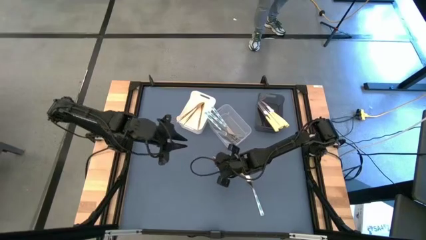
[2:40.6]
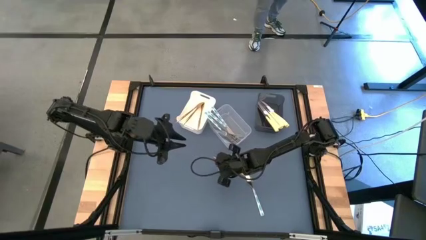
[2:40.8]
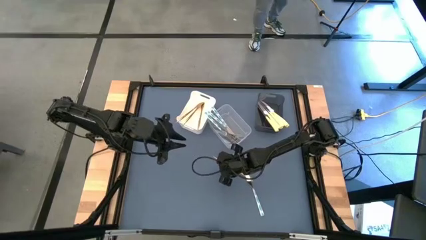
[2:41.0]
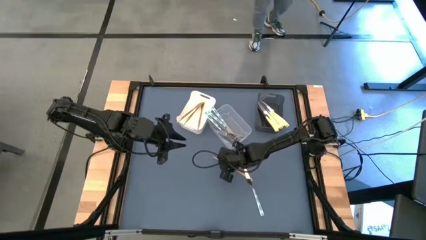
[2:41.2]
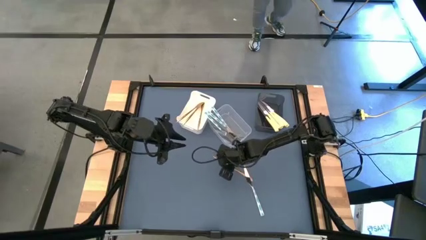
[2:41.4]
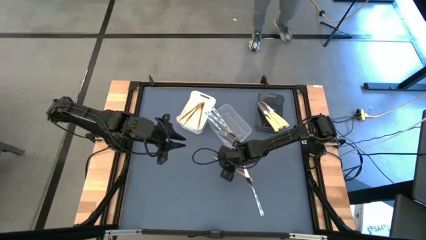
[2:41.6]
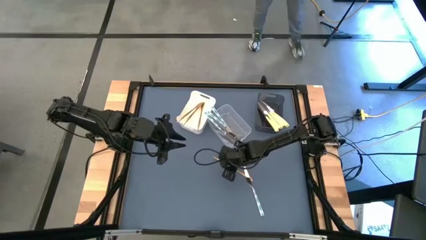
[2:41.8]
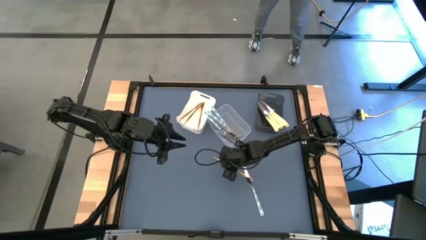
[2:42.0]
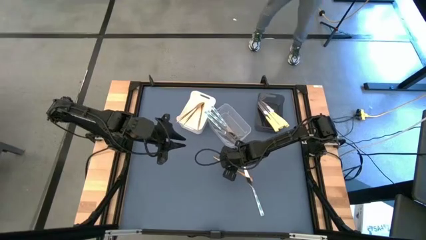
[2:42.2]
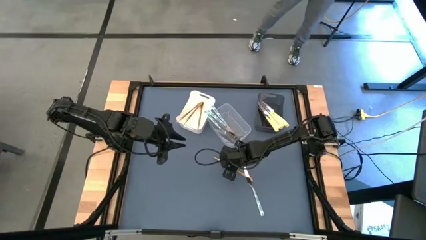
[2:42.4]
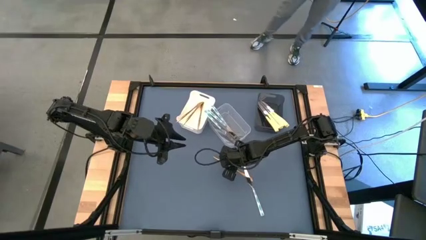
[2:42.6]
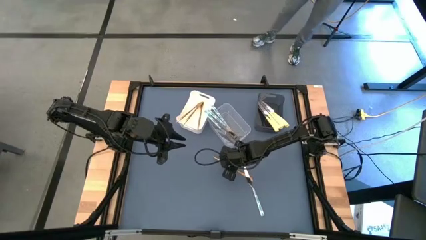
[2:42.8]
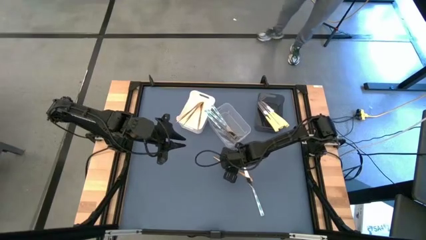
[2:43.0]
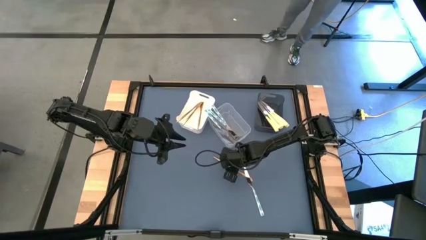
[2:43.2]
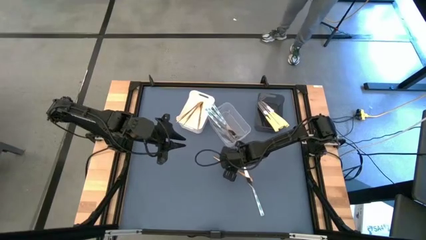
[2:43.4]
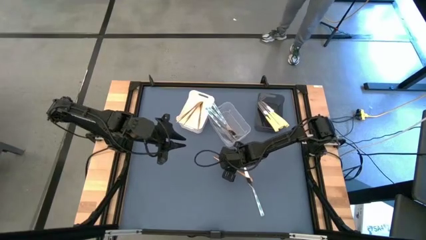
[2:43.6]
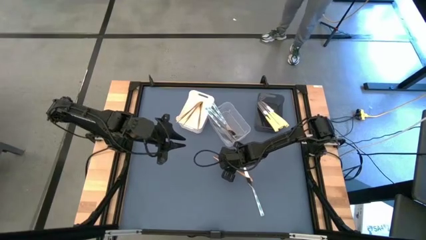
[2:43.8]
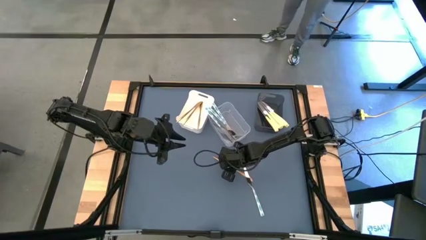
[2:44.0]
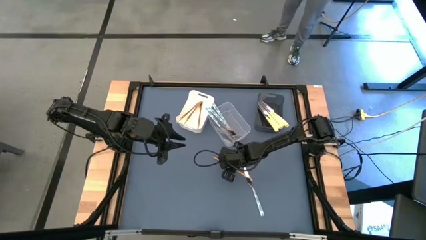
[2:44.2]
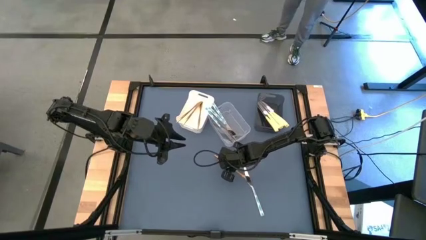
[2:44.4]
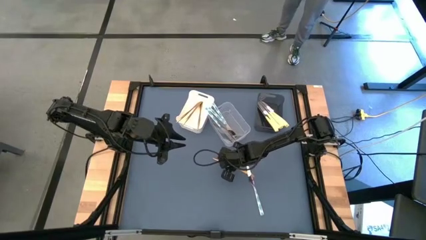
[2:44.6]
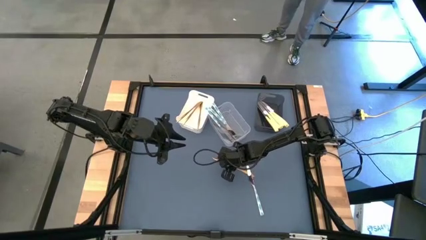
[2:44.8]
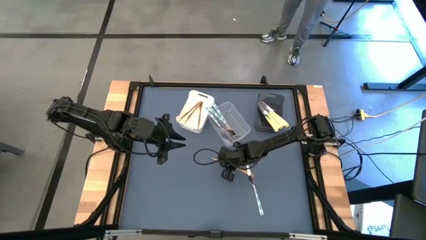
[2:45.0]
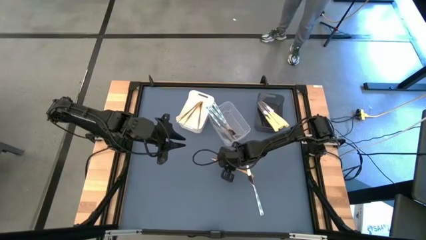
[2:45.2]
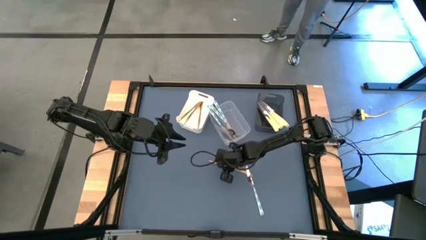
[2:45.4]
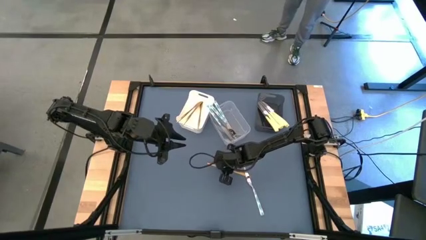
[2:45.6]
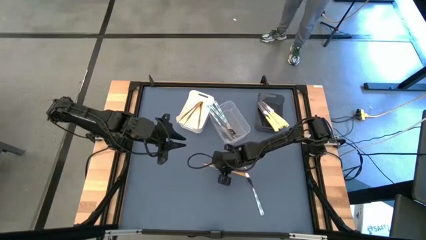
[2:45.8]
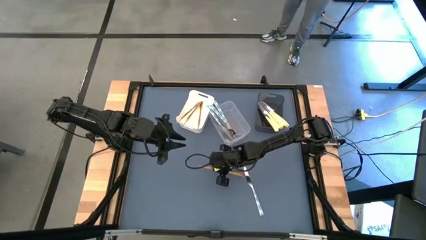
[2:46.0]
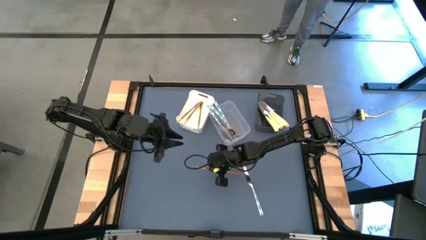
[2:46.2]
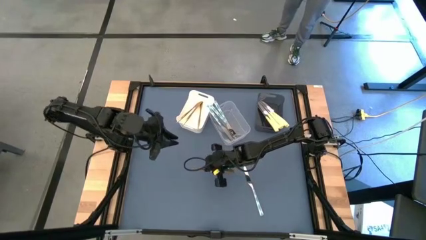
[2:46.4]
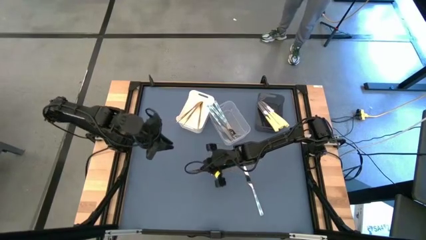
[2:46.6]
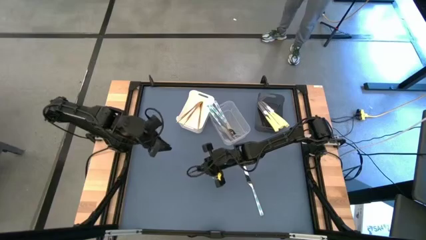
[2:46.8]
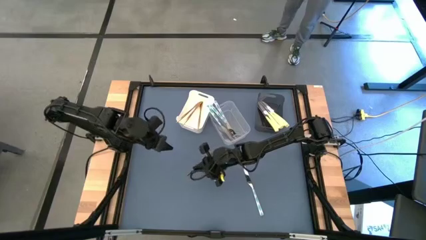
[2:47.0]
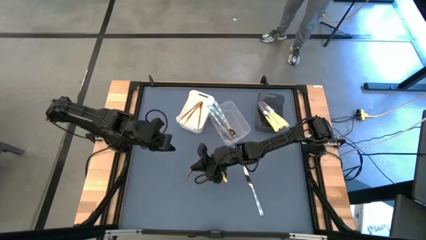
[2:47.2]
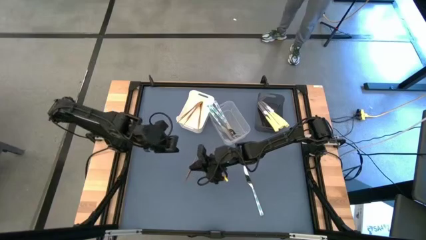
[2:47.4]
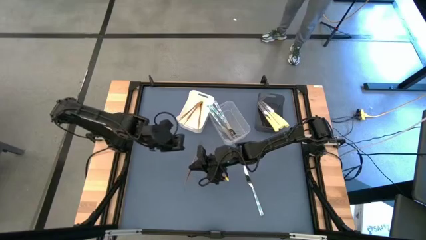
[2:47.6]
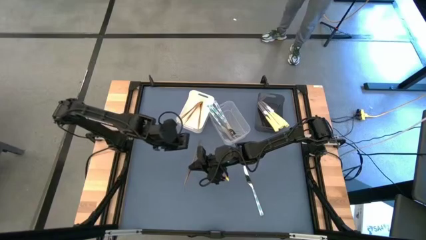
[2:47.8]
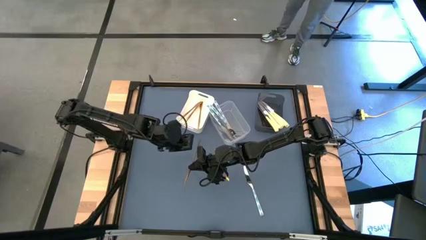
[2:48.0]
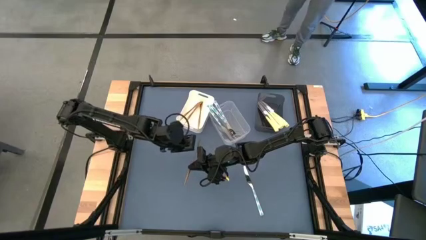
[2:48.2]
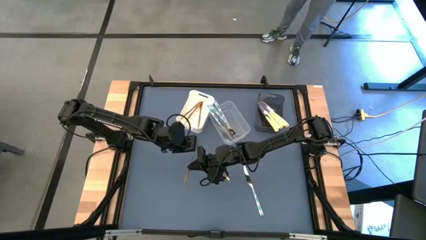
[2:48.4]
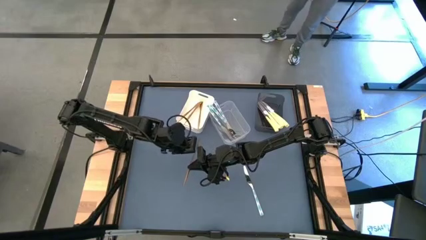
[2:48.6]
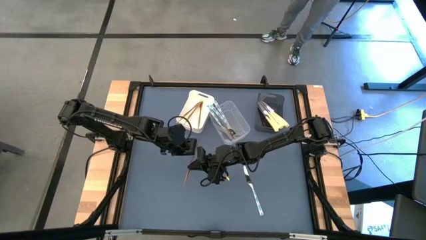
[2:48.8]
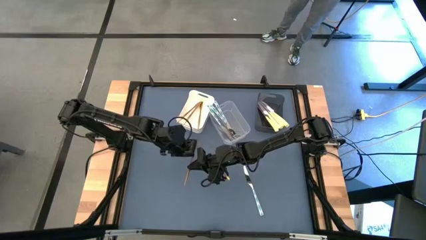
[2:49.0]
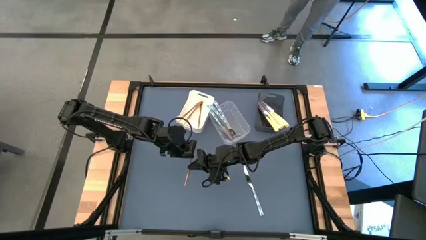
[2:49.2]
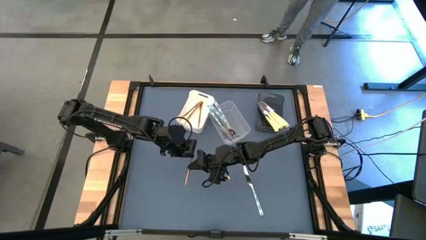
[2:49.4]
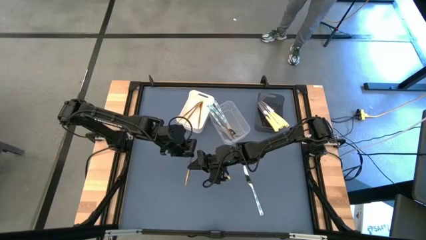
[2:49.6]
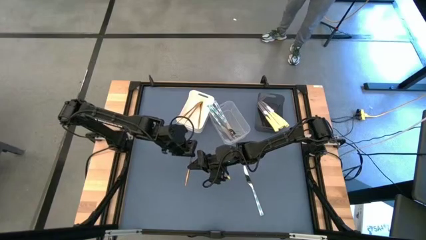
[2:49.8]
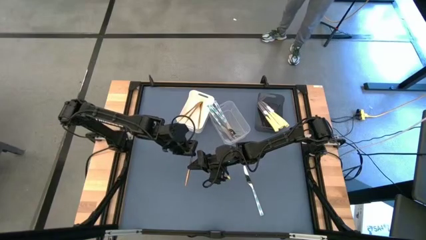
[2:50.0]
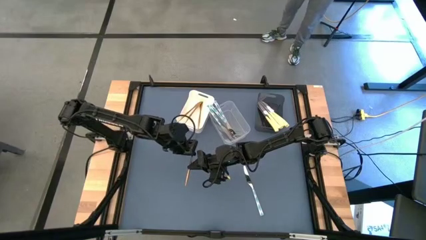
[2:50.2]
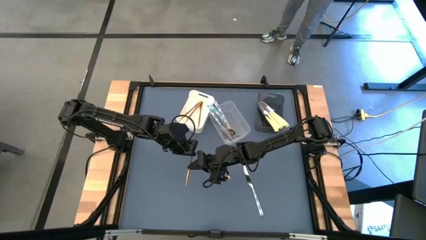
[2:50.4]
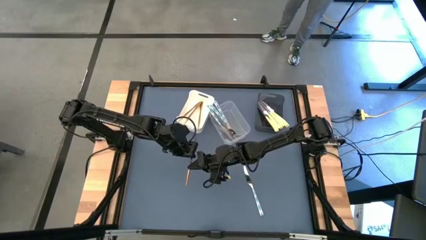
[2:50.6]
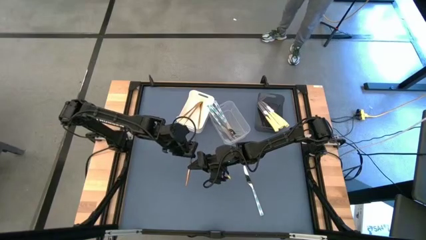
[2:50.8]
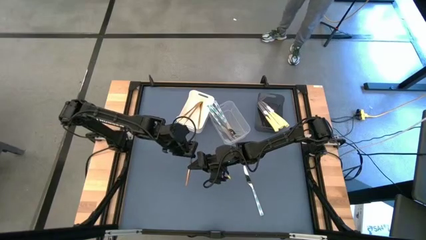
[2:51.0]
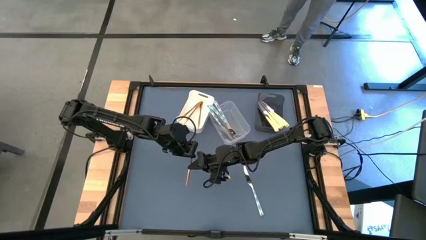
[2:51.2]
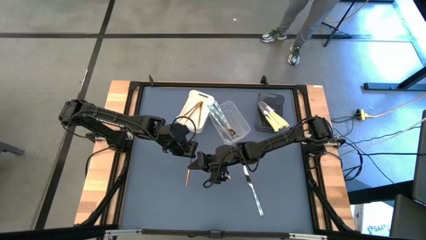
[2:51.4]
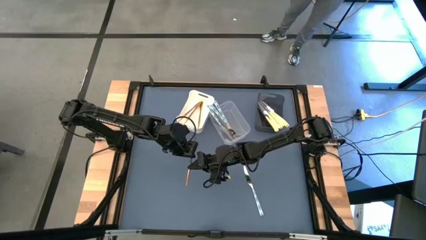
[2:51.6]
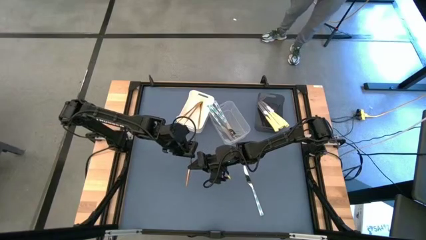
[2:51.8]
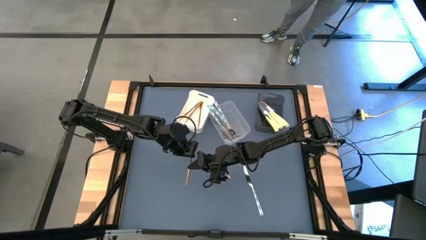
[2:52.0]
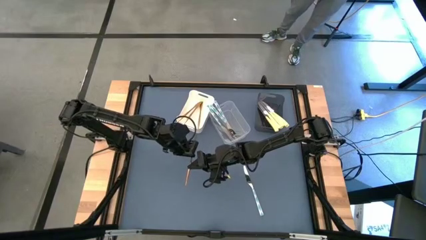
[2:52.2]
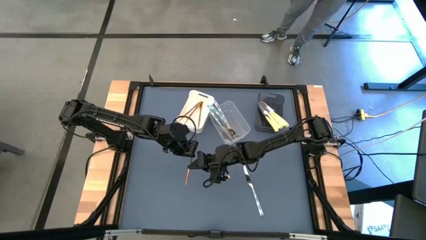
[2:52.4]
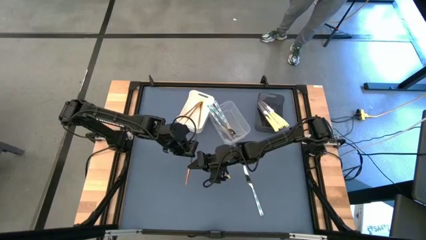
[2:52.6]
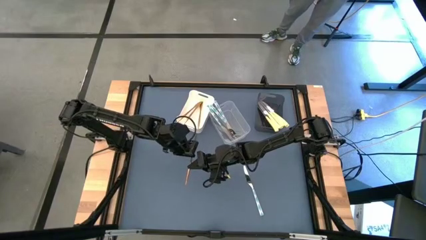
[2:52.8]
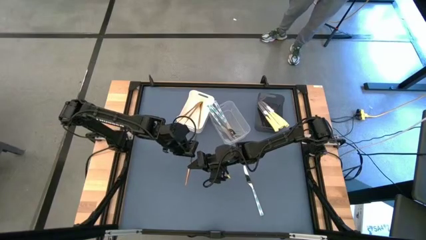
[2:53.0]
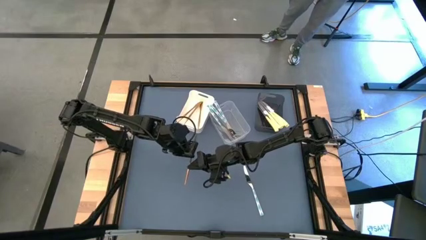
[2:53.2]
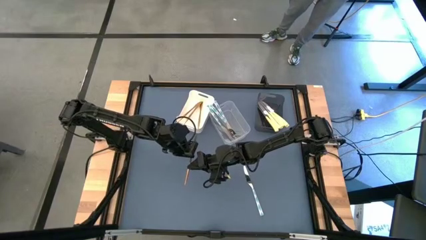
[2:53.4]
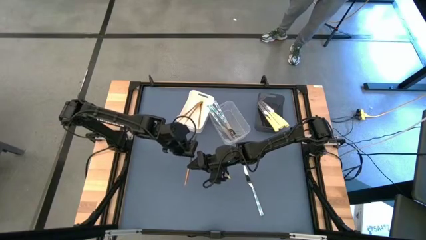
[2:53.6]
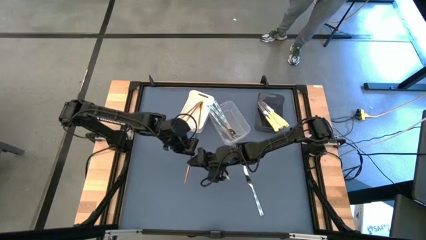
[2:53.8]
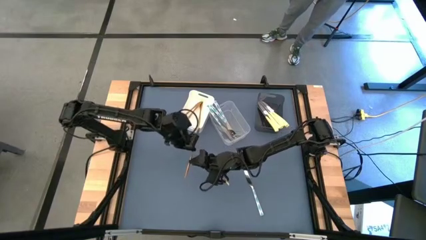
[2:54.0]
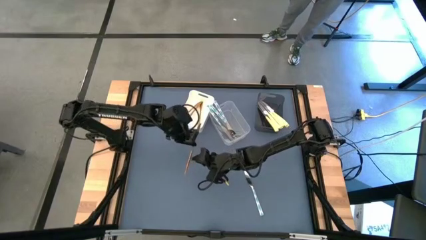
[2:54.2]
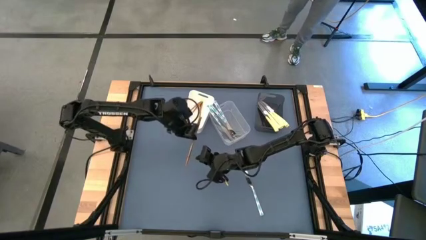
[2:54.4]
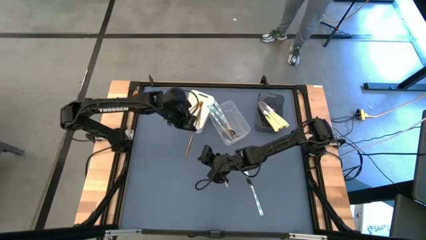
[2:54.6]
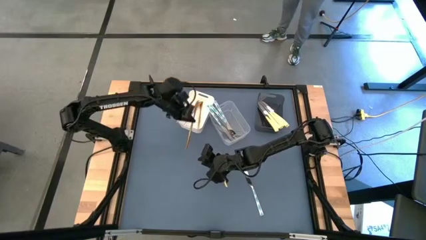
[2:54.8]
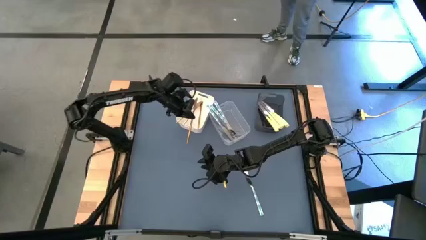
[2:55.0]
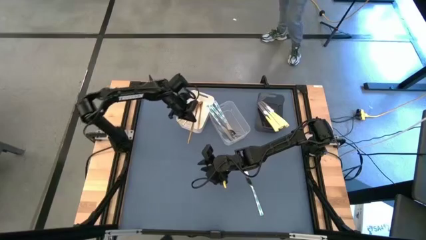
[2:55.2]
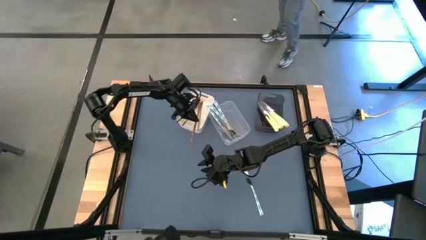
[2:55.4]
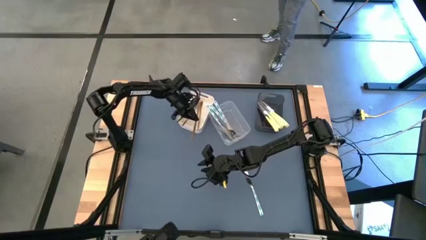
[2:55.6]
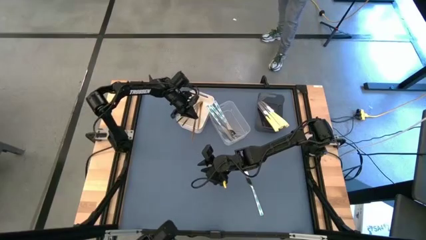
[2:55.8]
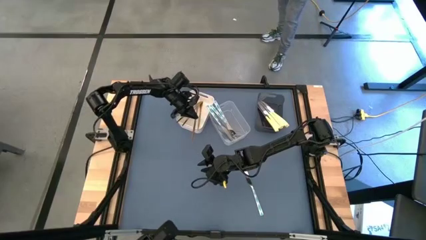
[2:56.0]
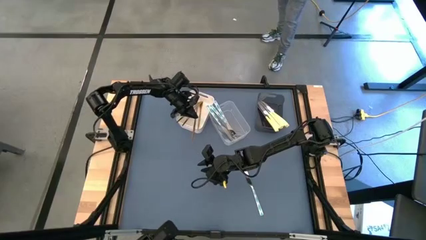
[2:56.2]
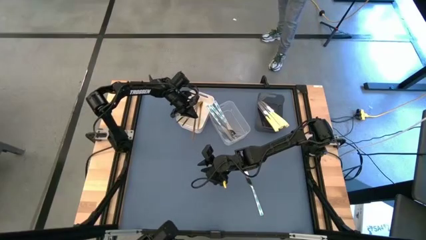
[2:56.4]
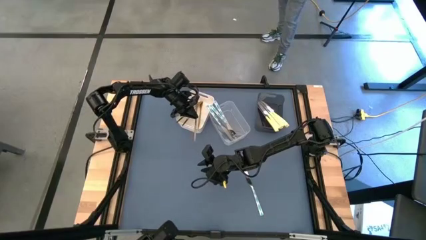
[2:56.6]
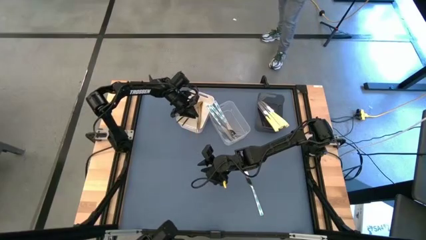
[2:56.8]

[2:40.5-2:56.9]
Task: Sort silverware by color (type)
Put the gold knife into the white bin
